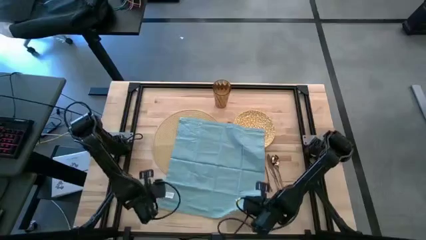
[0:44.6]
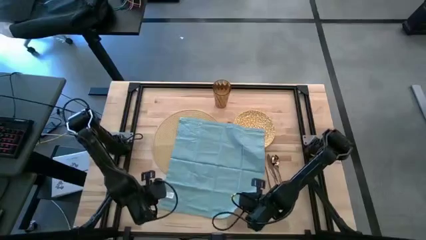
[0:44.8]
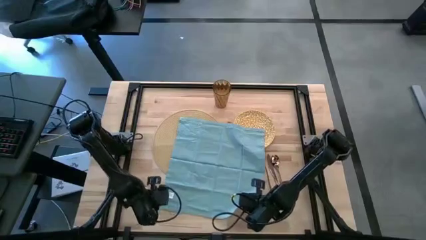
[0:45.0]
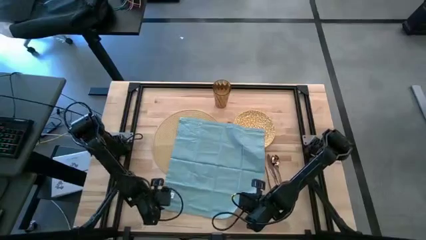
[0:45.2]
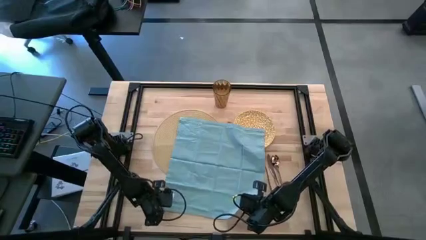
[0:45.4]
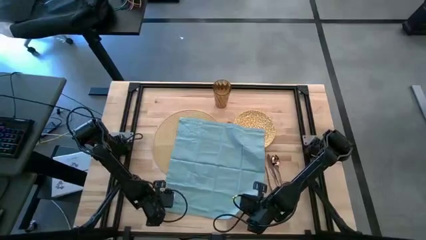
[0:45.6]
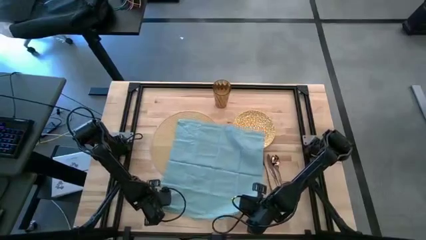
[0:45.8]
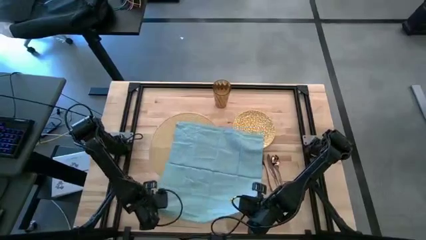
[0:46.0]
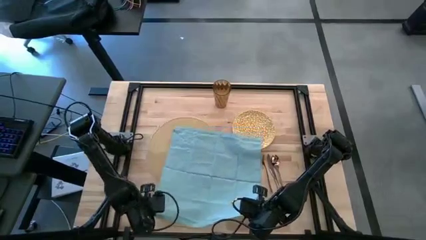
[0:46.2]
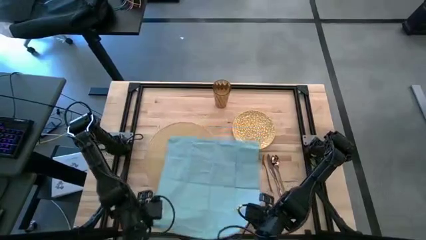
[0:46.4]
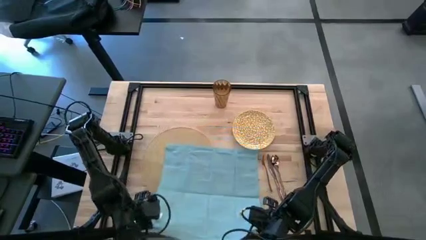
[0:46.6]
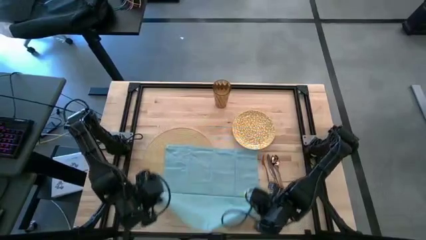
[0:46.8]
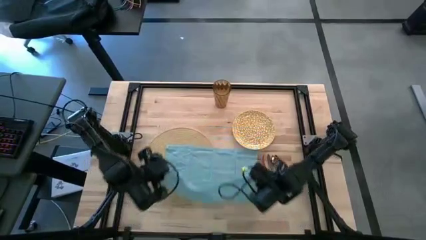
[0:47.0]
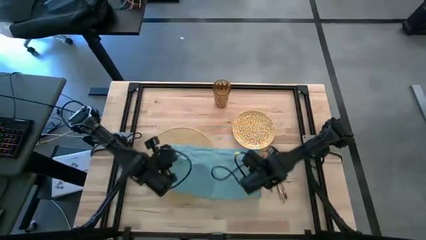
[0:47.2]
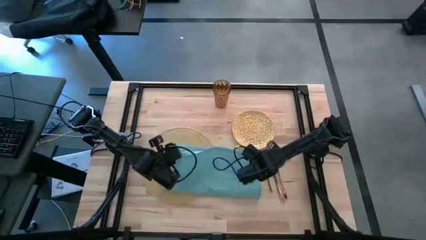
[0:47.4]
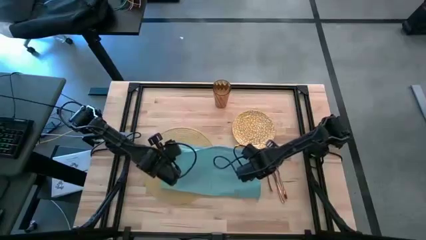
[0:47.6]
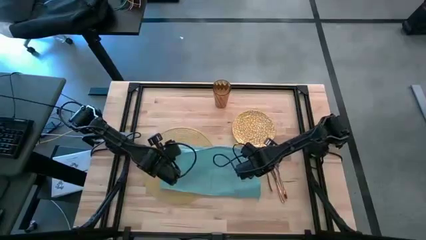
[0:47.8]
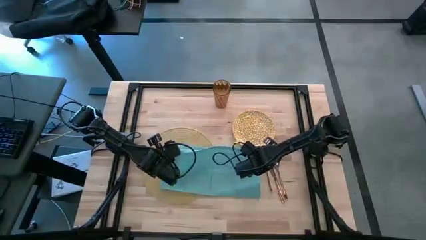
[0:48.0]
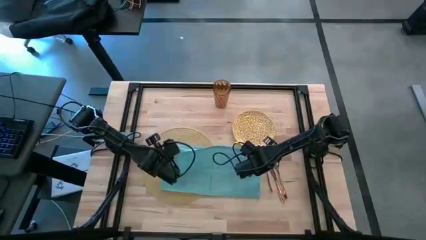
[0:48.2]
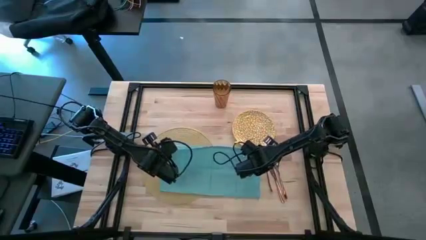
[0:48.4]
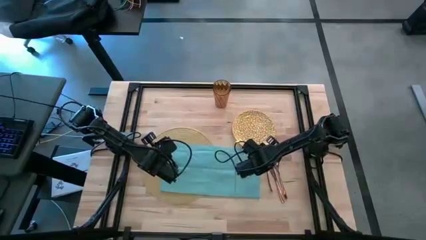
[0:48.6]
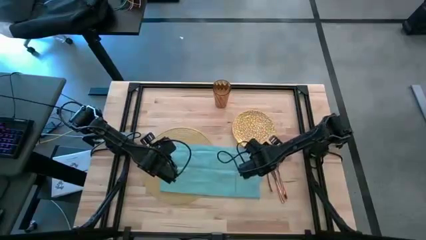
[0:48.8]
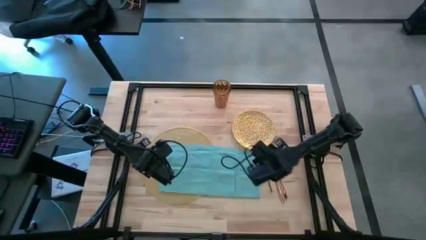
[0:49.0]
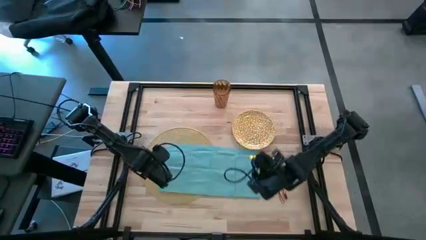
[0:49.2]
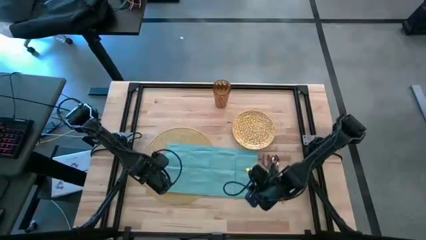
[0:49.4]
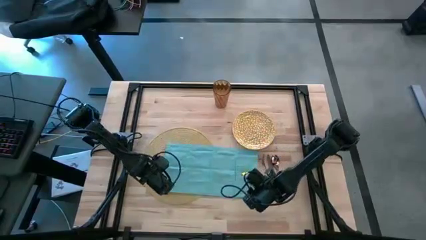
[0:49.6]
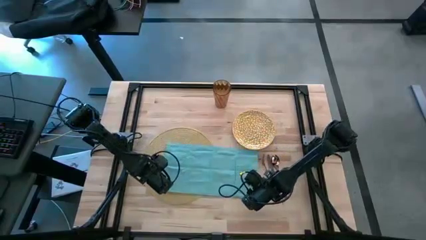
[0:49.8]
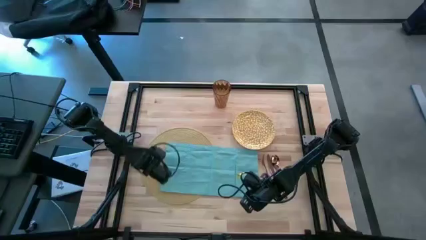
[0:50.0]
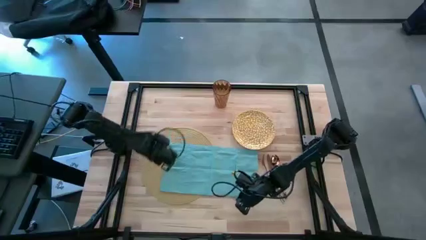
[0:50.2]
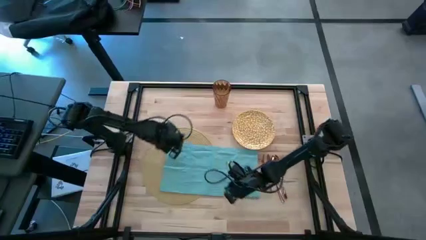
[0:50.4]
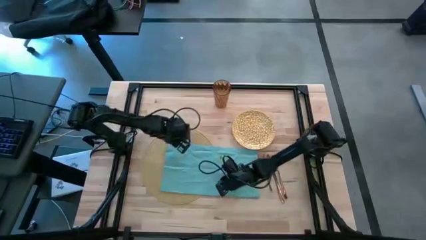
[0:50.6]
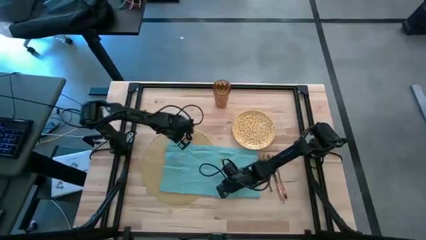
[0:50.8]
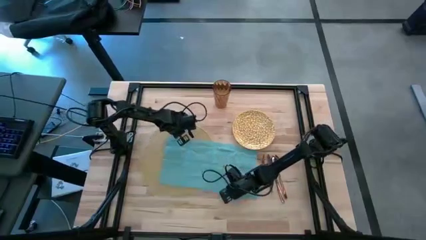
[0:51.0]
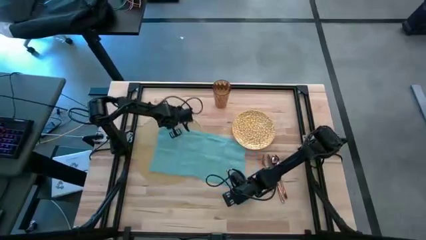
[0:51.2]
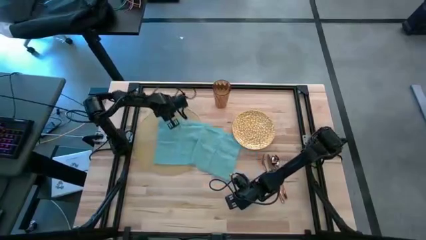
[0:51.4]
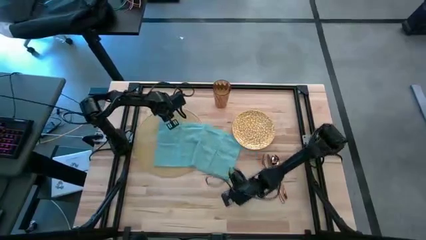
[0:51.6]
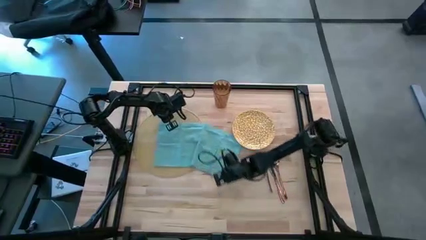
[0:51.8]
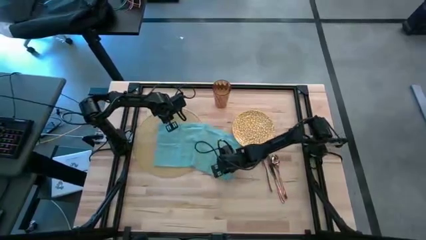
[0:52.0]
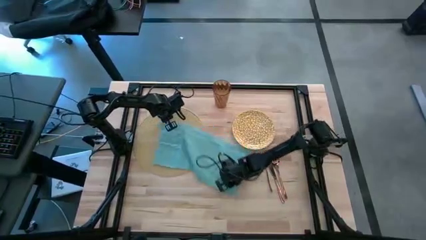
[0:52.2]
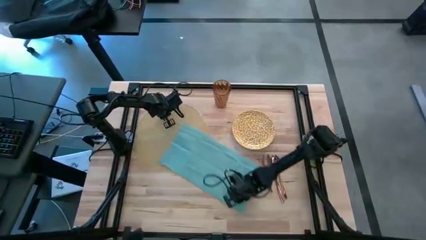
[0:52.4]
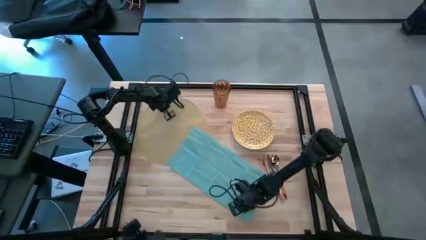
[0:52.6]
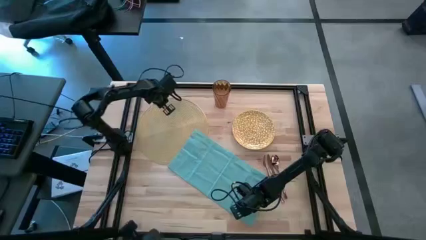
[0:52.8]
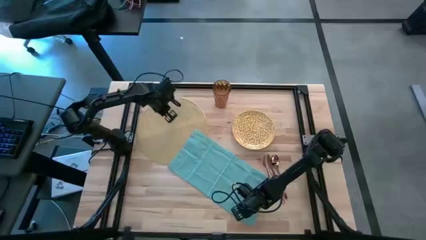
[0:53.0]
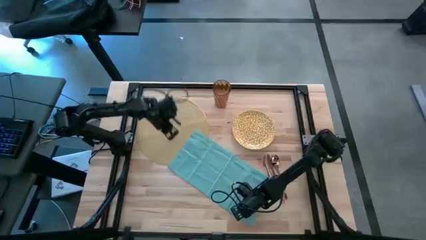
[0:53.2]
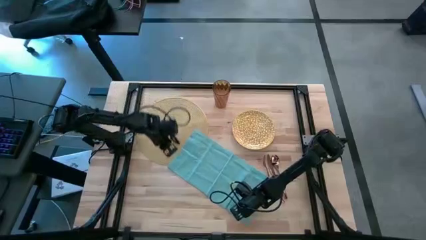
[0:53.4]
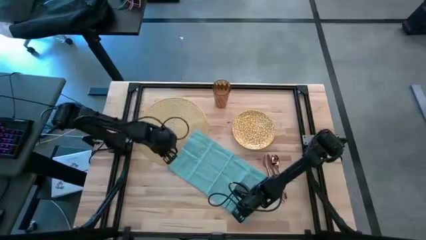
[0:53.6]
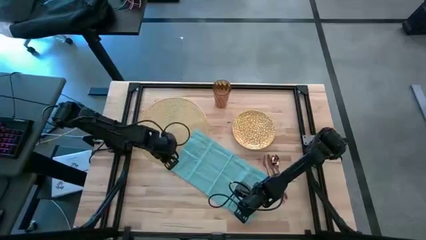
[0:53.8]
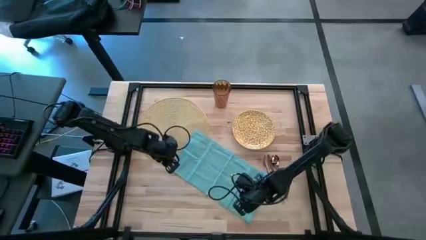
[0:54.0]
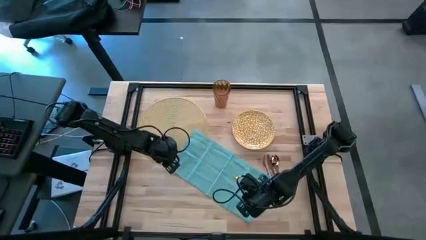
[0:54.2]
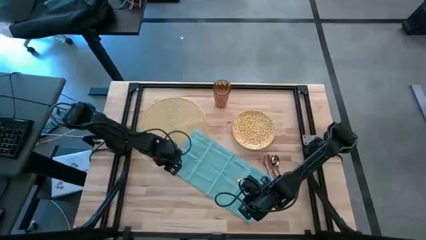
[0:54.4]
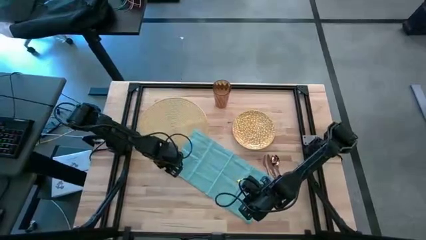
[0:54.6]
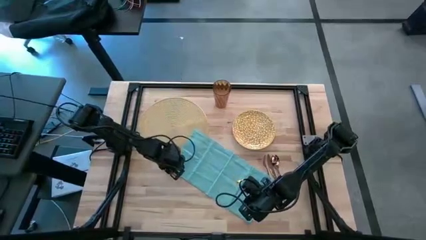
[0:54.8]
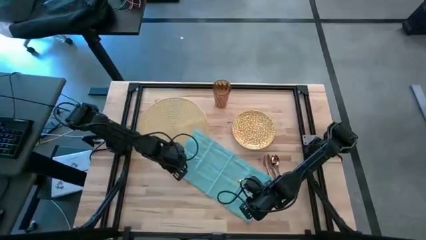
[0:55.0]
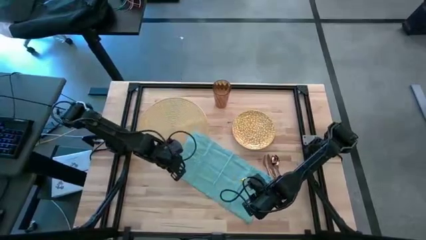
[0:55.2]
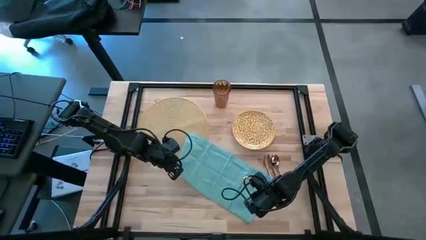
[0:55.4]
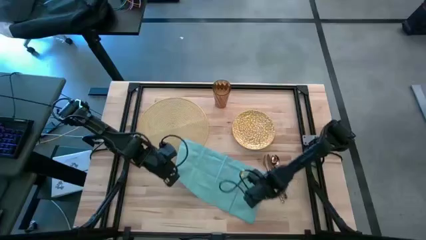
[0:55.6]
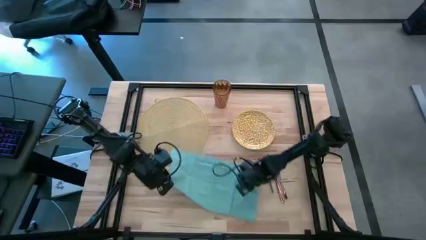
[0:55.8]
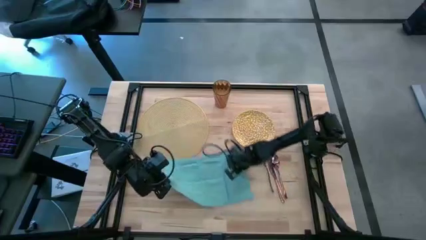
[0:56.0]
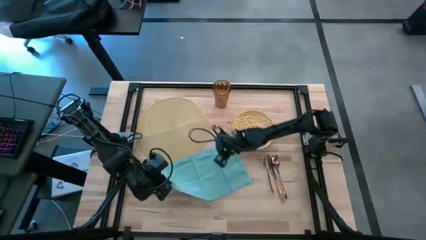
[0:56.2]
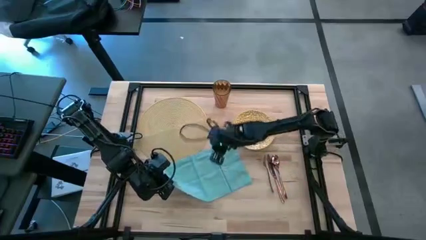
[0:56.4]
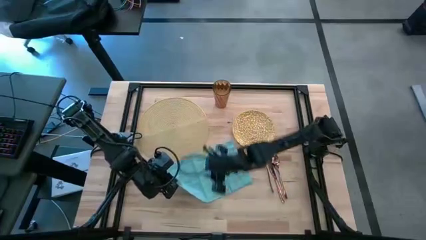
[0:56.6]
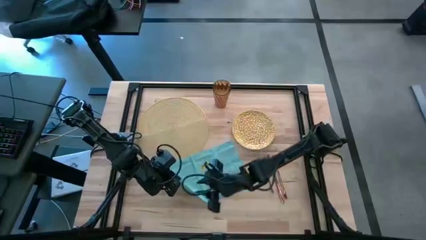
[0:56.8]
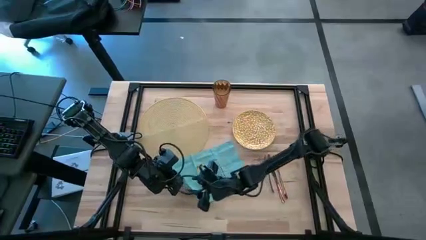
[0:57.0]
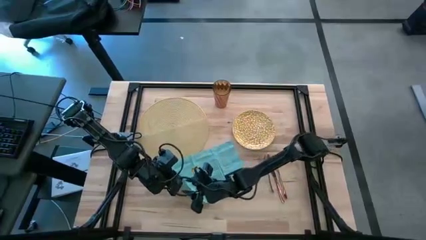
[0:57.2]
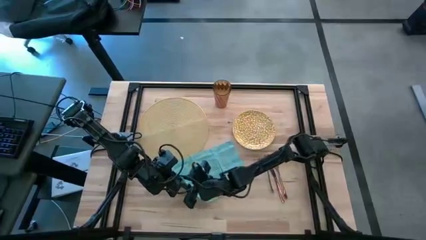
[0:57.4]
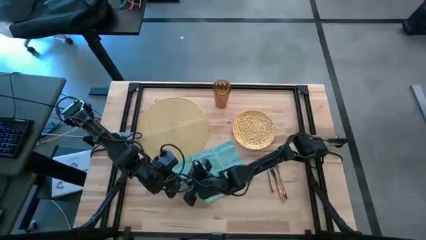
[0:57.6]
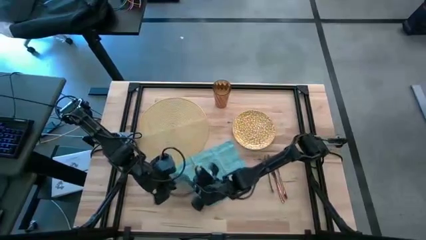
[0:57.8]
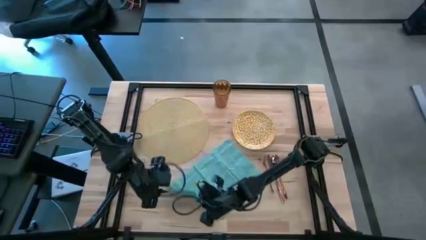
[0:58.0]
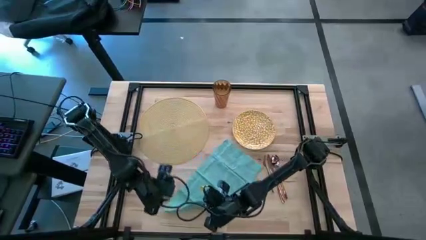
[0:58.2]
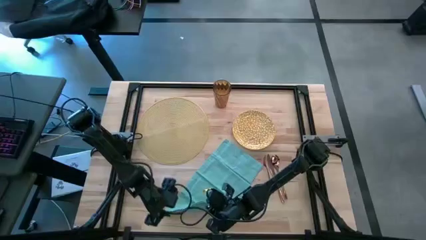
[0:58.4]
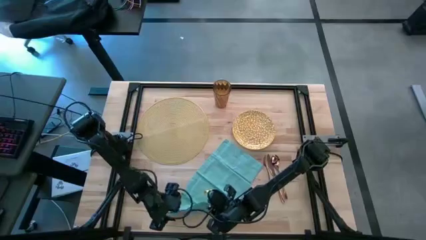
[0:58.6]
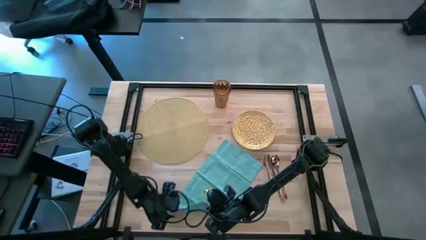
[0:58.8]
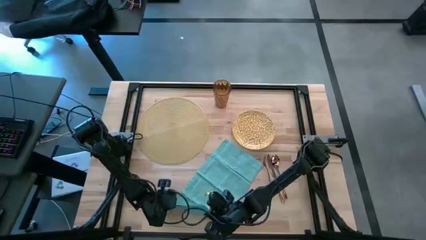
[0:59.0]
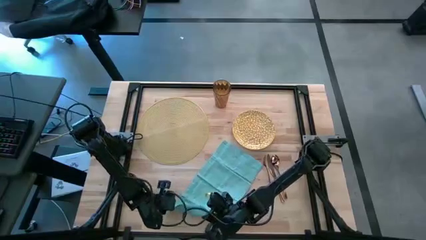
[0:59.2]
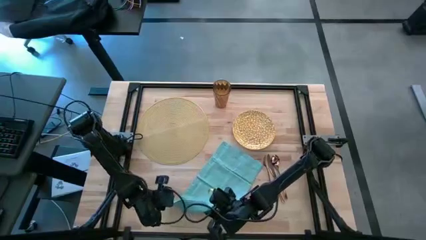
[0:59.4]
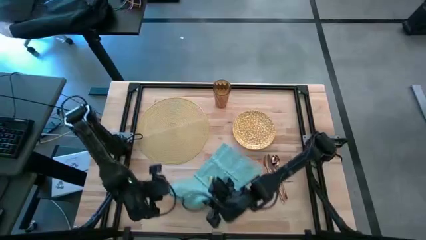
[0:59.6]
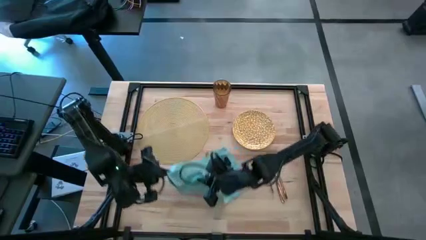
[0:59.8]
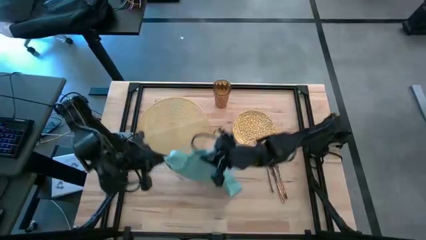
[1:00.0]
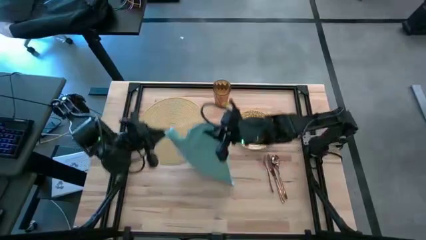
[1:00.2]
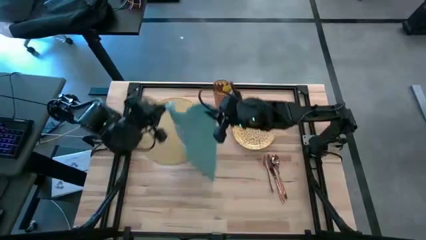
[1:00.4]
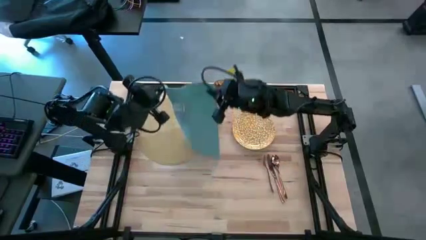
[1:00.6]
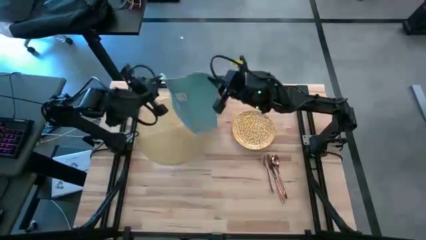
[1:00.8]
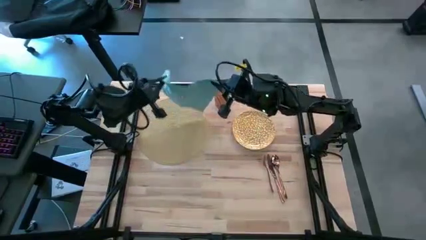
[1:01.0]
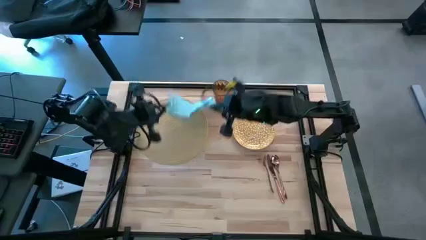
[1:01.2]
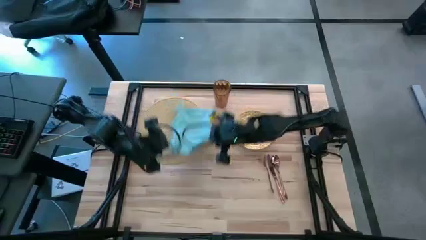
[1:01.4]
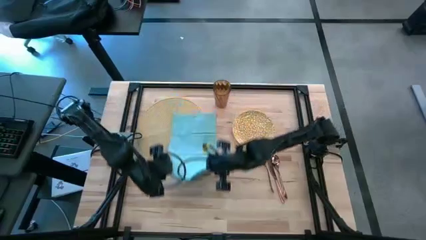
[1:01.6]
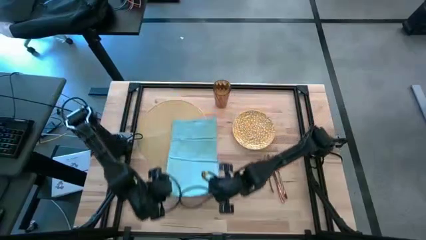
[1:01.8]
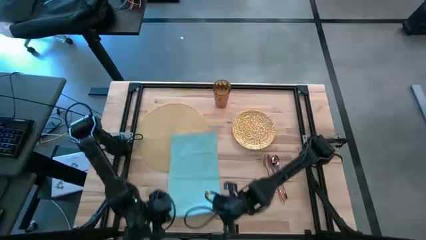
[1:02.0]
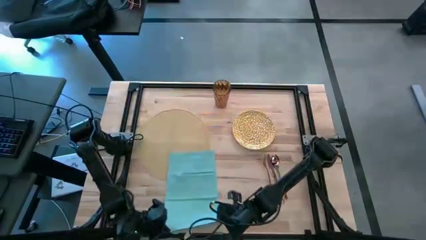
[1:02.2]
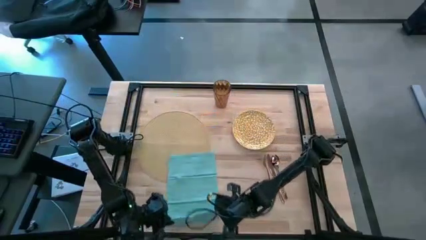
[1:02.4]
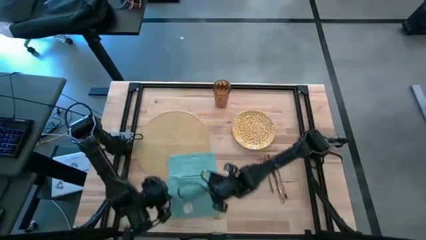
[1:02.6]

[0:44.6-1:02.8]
Task: Set table place
Fold the blue table napkin
